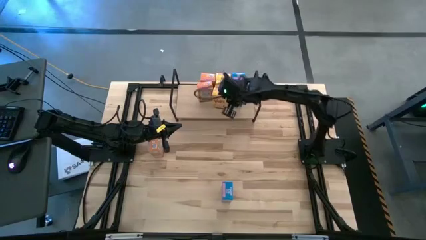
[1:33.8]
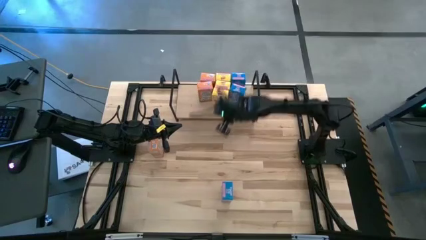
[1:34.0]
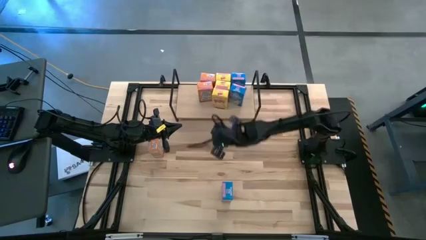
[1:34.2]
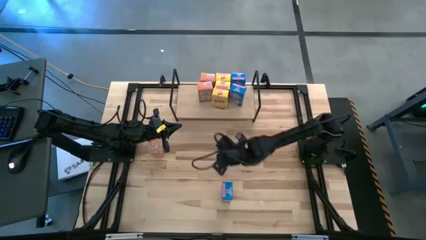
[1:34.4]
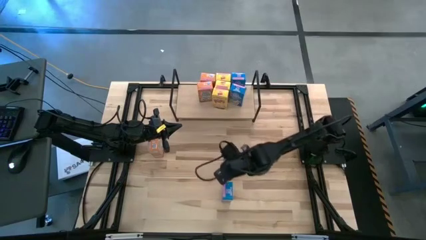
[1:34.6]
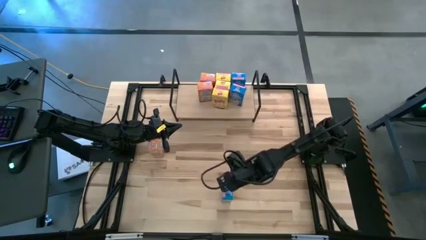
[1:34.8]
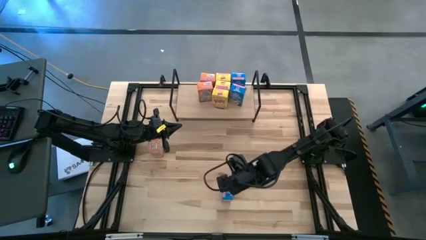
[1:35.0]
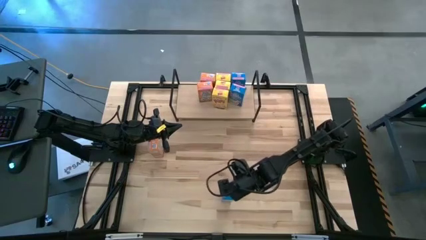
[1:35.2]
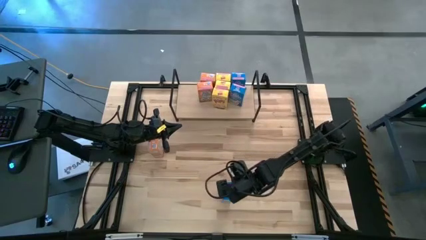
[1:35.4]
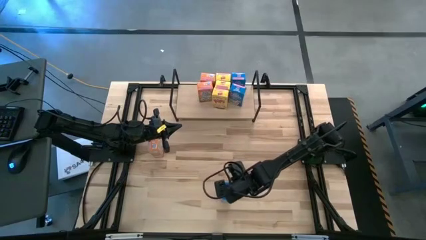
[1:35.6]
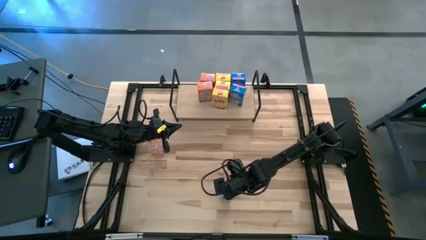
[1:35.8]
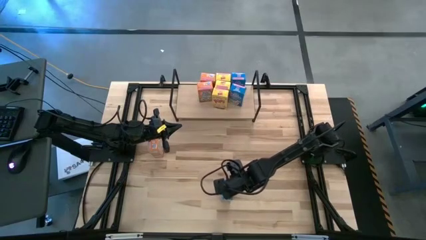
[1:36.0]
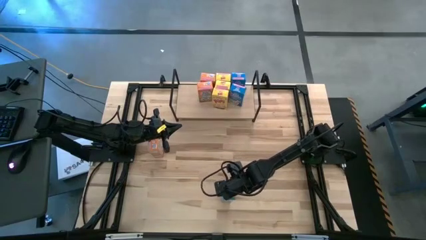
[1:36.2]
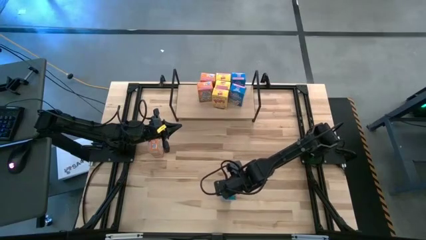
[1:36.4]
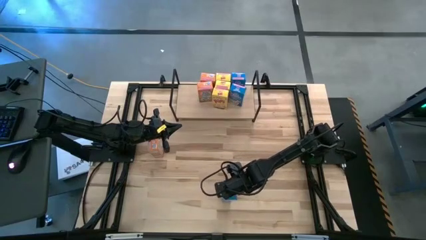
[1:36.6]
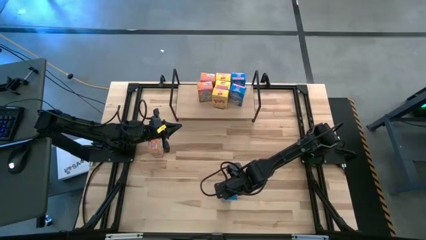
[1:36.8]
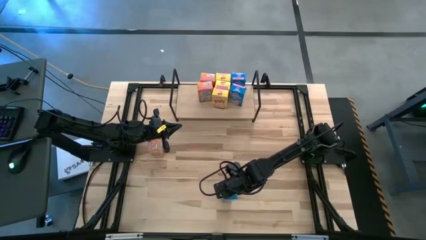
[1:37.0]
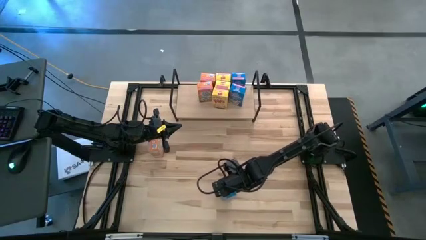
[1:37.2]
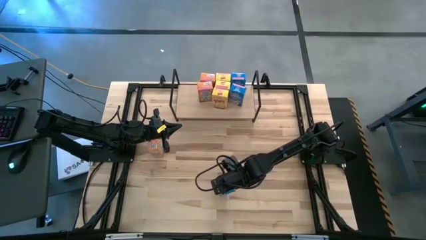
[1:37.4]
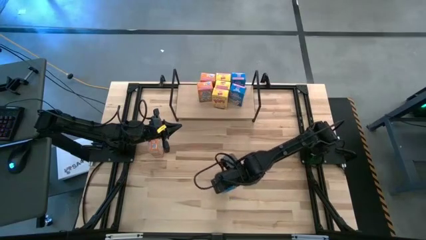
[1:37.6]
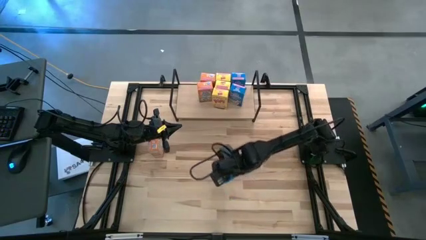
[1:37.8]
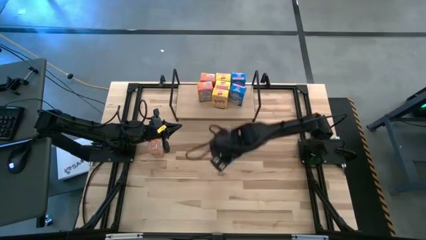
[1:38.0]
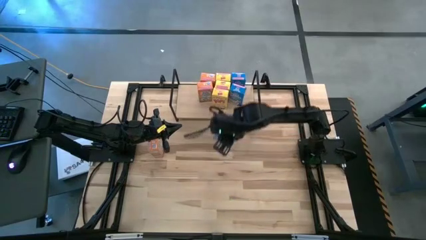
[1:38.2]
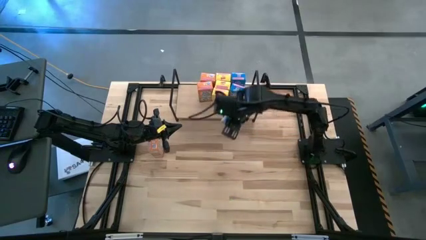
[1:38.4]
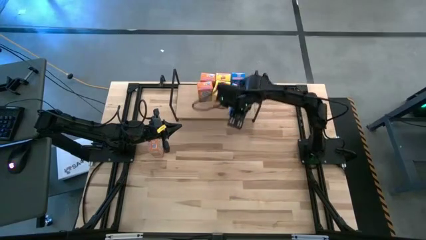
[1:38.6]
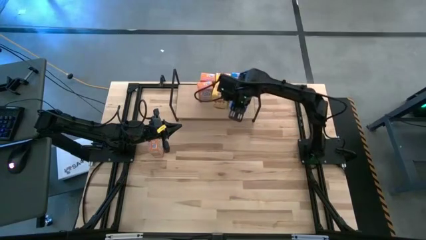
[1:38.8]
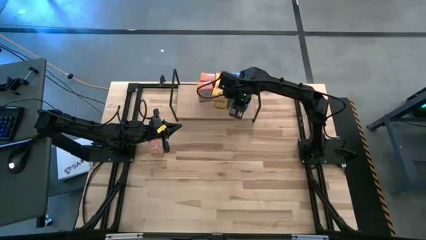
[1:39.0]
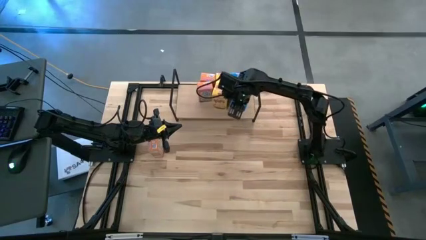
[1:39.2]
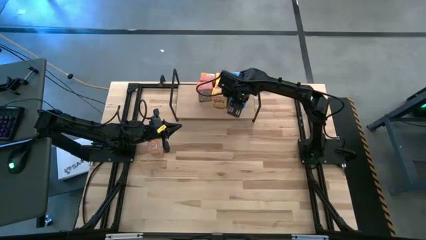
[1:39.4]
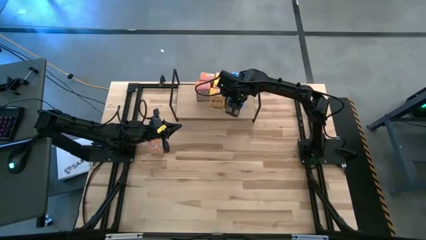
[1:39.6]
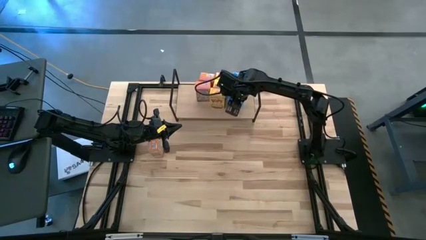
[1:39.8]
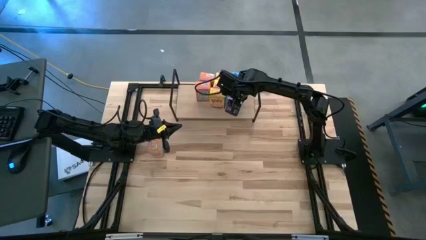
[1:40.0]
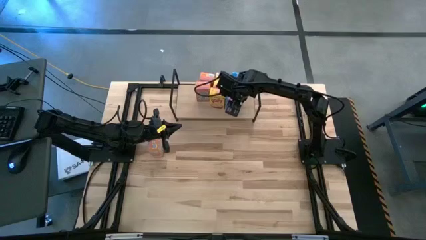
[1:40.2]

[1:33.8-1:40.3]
Task: Stack cereal on shelf
Put the blue cereal box aligned with the other blue cereal boxes on the shelf

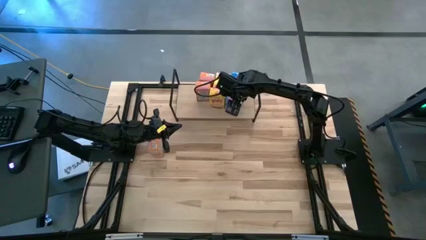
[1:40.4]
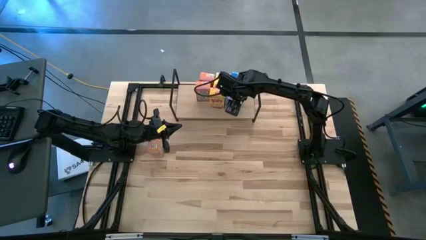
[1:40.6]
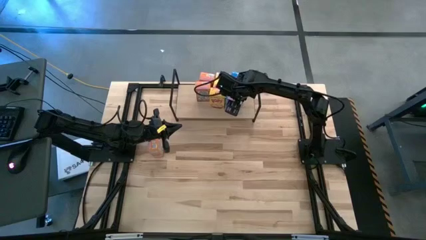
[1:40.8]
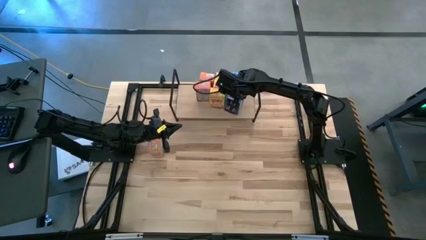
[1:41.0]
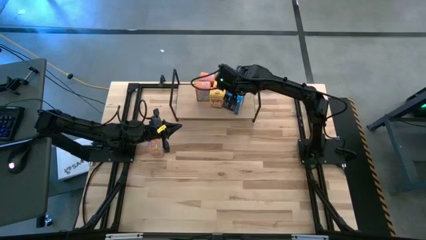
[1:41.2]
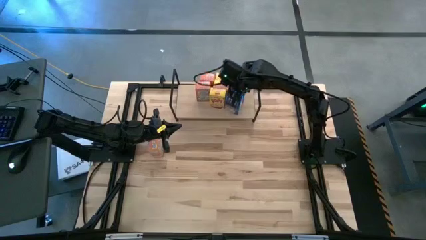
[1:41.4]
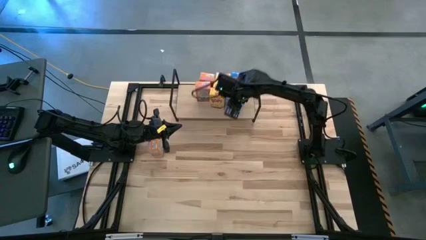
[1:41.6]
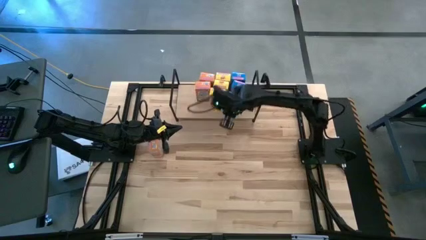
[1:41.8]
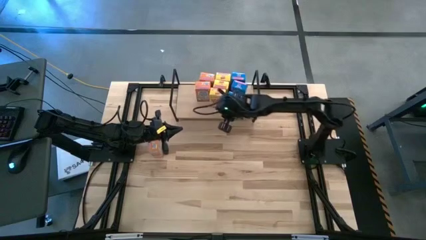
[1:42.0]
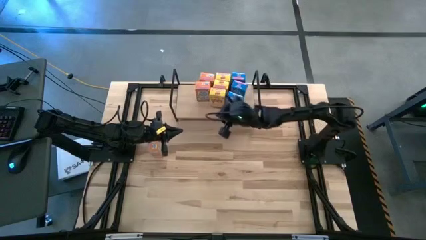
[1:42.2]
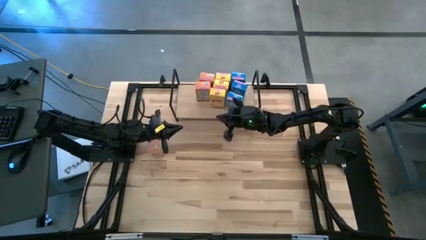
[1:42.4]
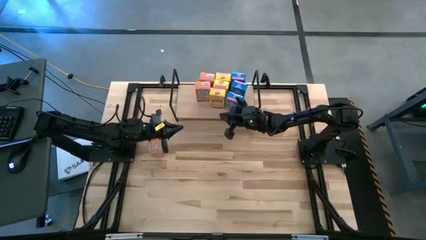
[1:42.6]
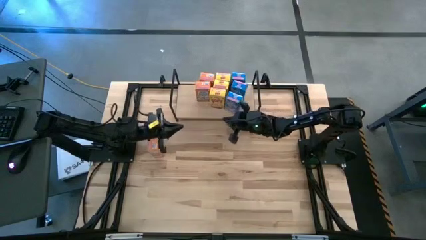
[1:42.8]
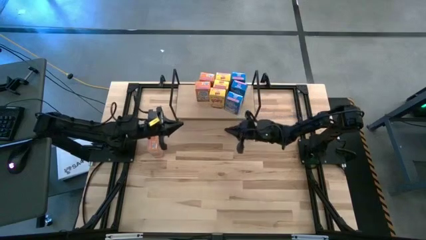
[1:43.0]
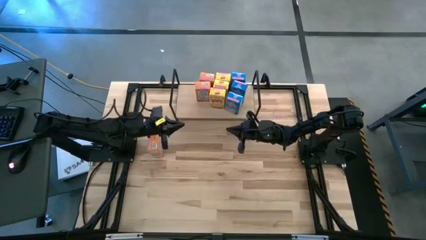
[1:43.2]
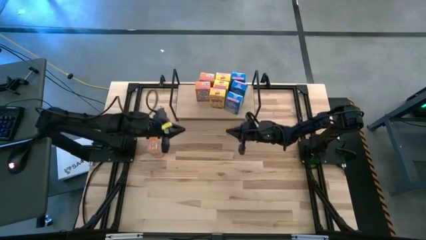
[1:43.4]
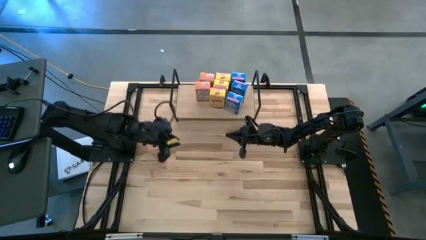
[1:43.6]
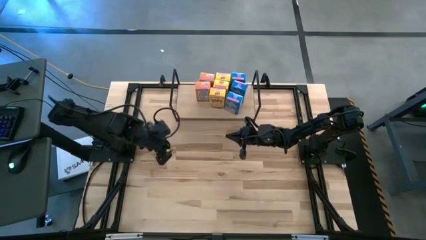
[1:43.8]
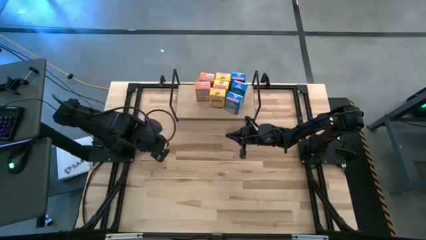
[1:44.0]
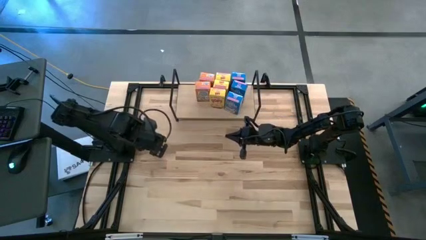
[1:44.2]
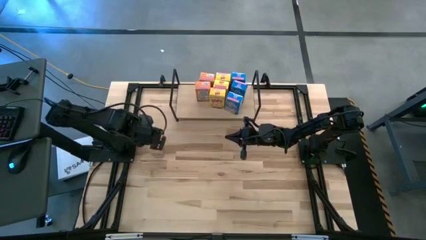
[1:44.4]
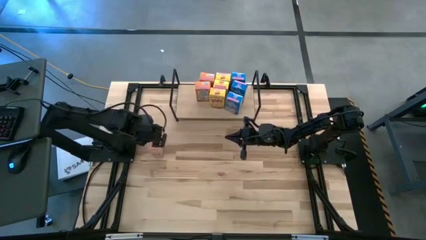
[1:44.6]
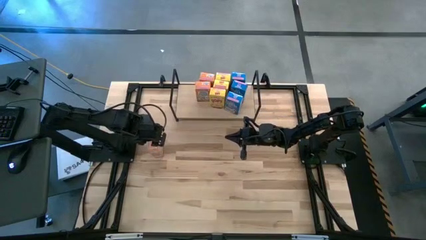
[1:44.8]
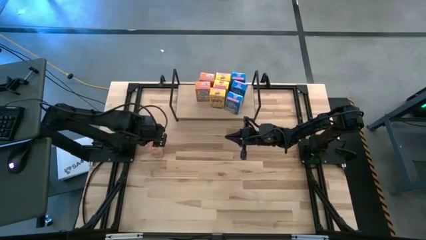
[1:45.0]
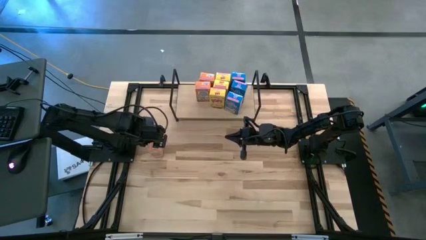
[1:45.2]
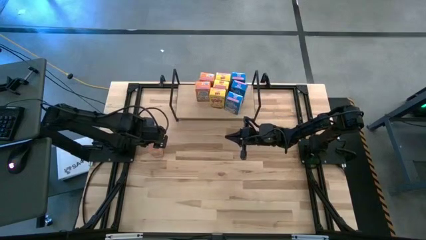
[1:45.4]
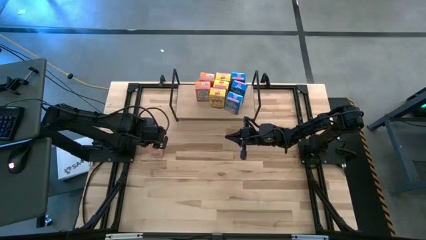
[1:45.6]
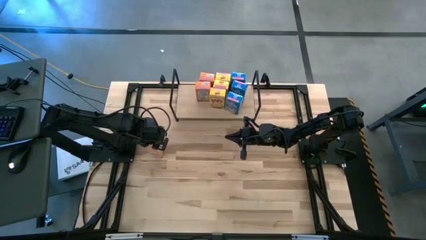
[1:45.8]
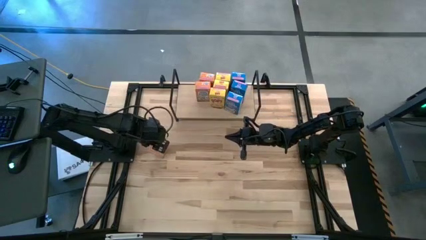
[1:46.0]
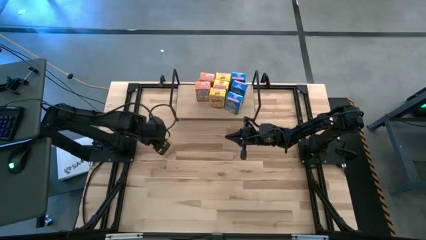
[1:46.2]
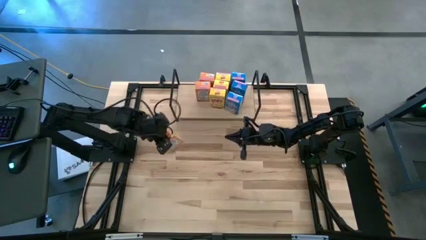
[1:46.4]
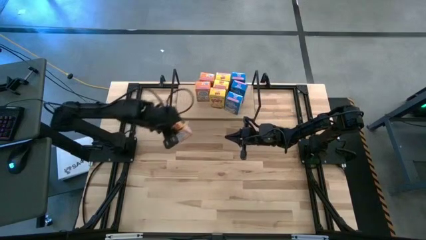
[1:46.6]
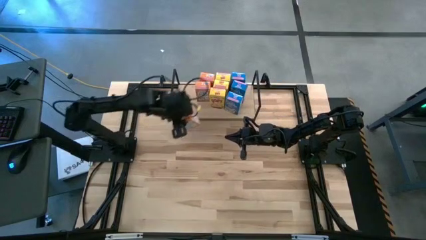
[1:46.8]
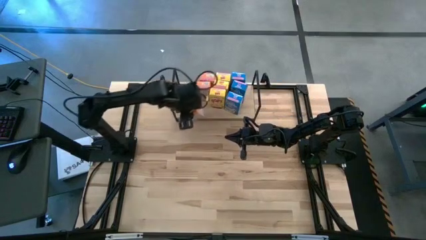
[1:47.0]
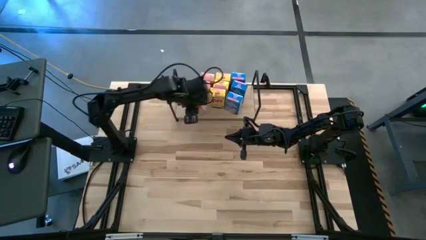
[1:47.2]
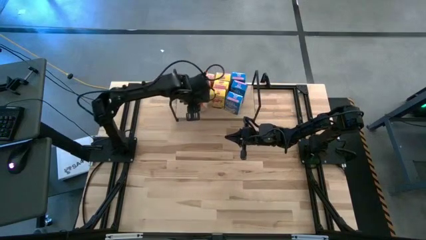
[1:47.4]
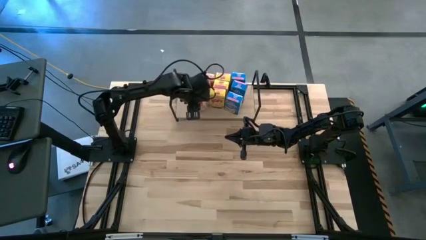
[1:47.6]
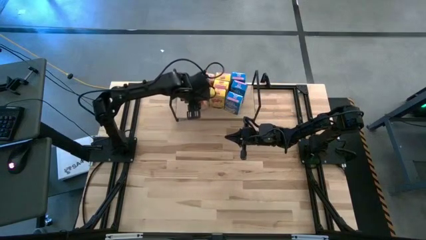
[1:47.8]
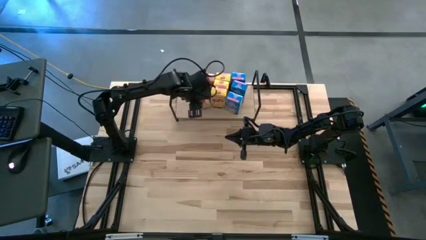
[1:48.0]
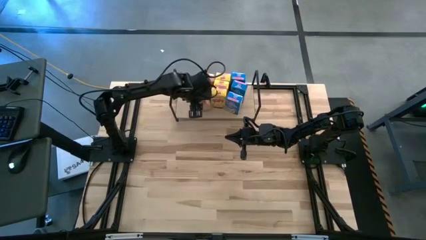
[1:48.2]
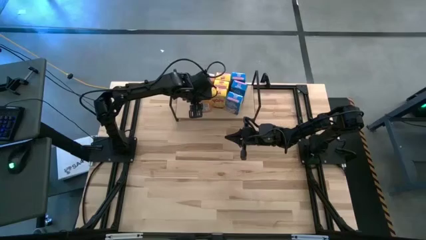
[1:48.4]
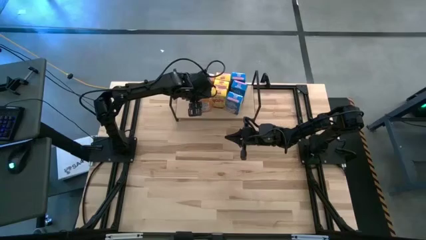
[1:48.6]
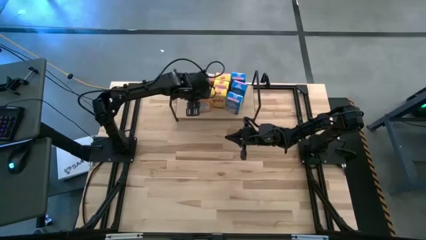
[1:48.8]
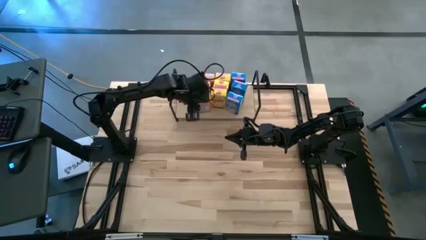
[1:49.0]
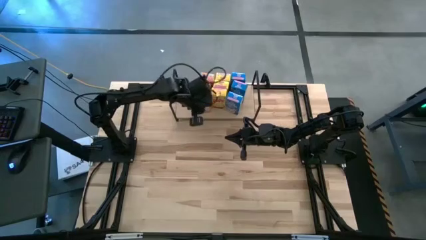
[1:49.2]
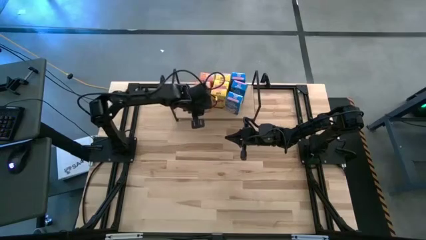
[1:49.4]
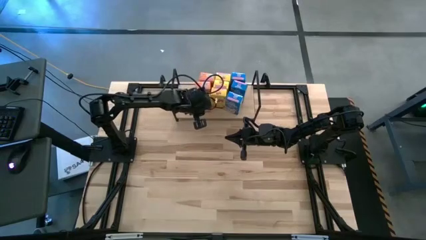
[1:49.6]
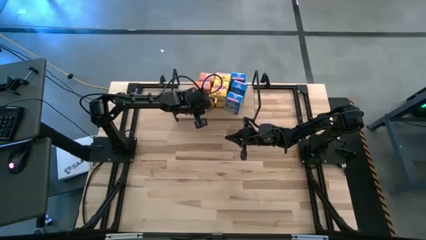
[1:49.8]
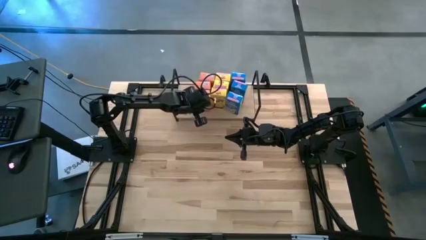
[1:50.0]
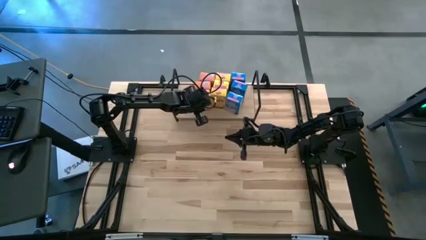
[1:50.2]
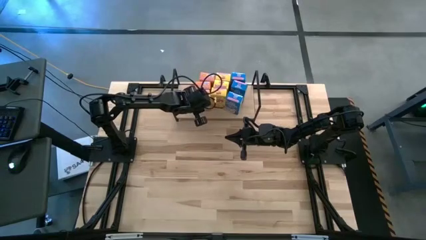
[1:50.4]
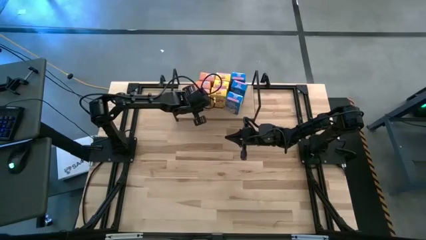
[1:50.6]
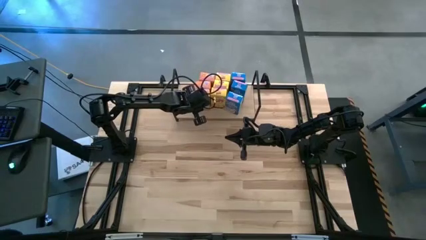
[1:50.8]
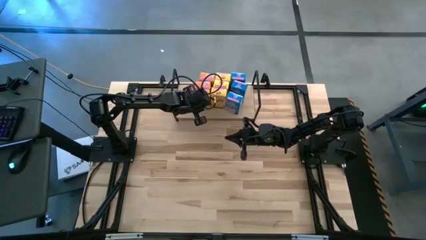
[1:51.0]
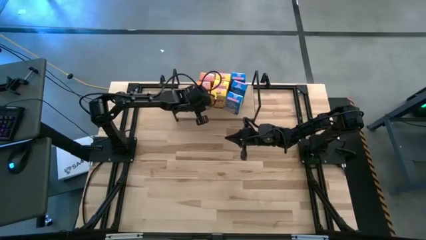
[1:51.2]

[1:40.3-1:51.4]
Put the orange cereal box aligned with the other orange cereal boxes on the shelf
